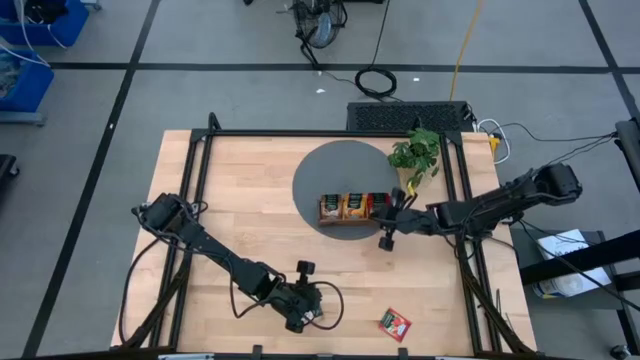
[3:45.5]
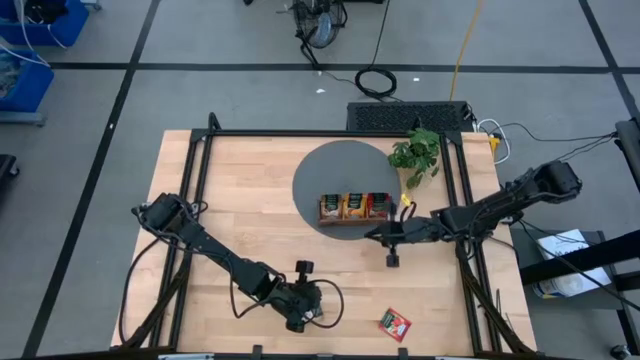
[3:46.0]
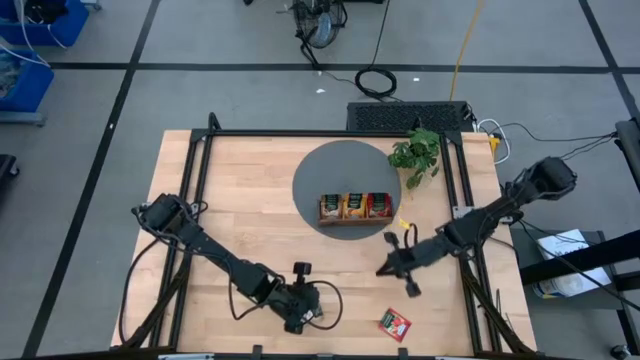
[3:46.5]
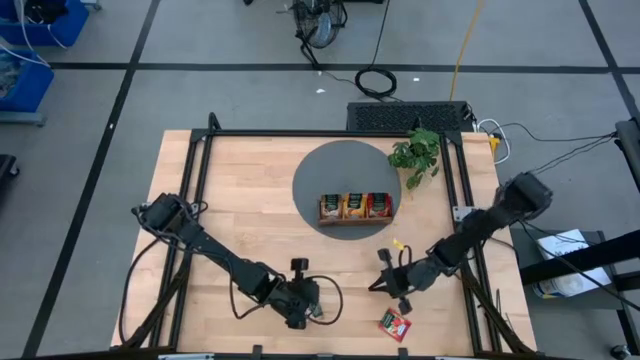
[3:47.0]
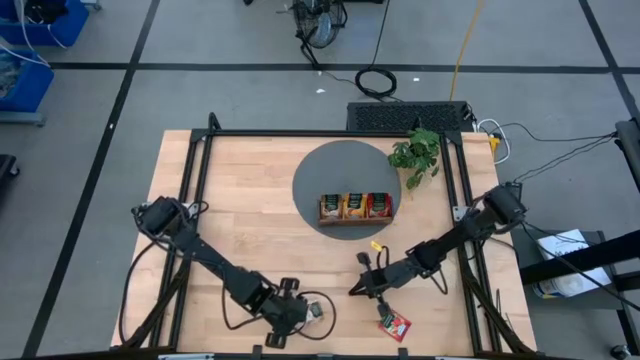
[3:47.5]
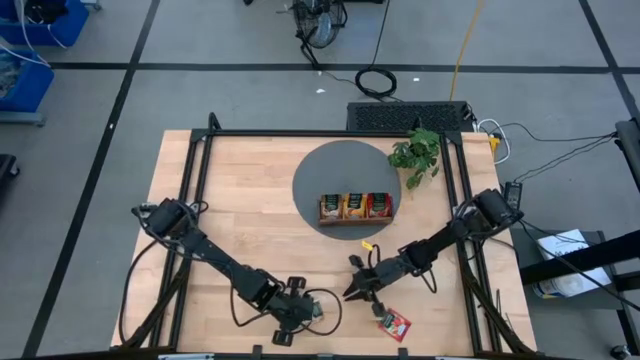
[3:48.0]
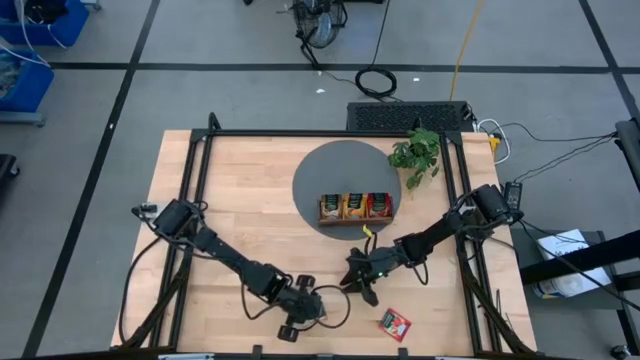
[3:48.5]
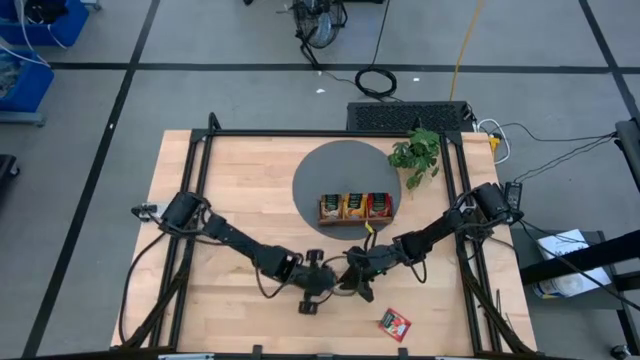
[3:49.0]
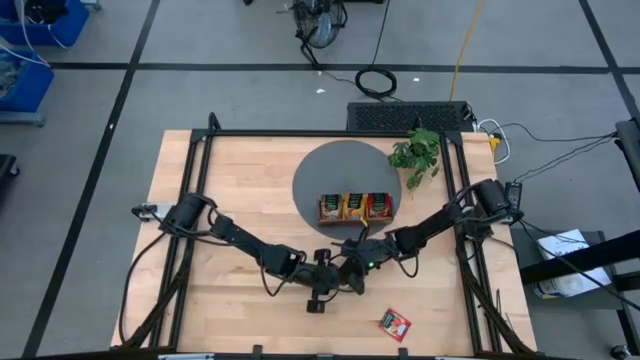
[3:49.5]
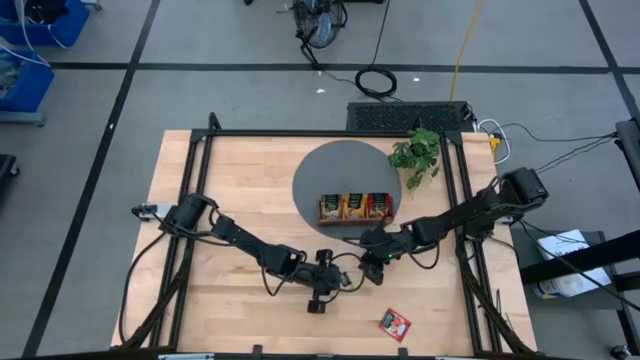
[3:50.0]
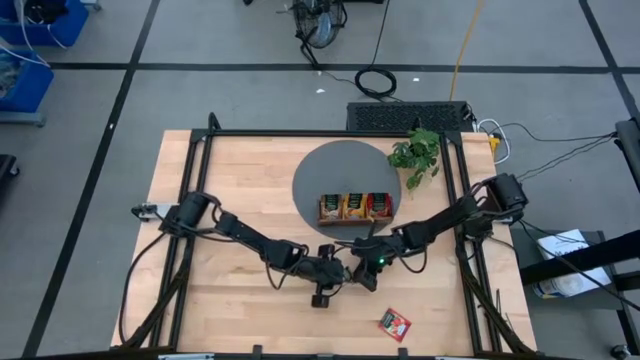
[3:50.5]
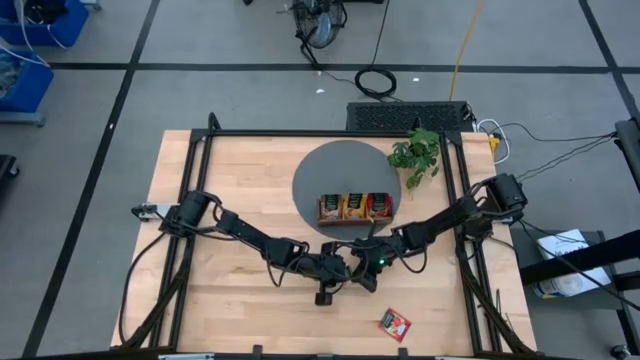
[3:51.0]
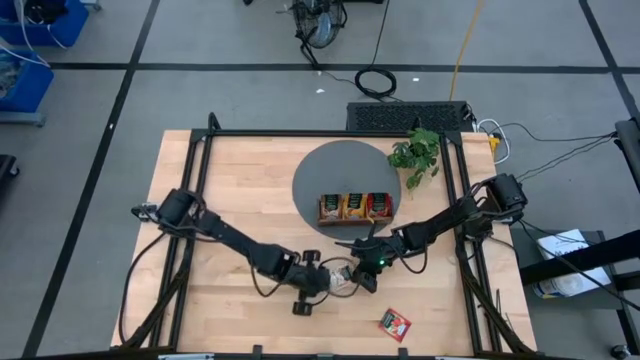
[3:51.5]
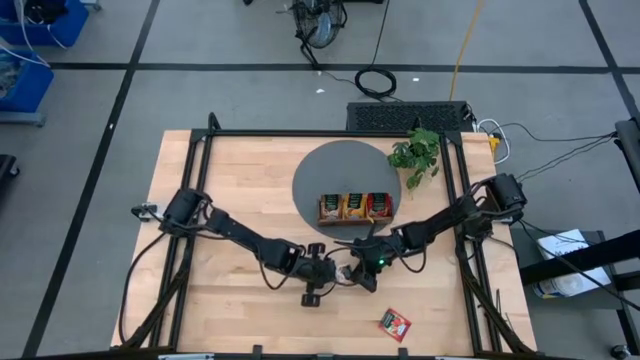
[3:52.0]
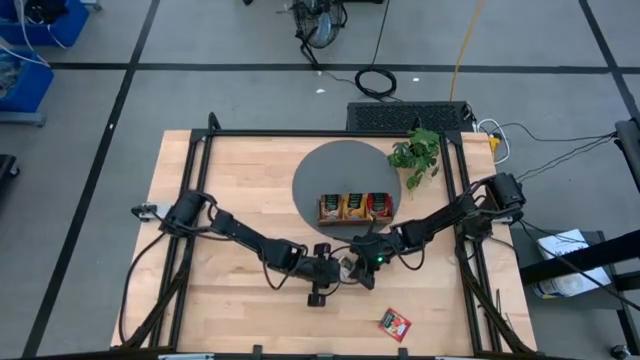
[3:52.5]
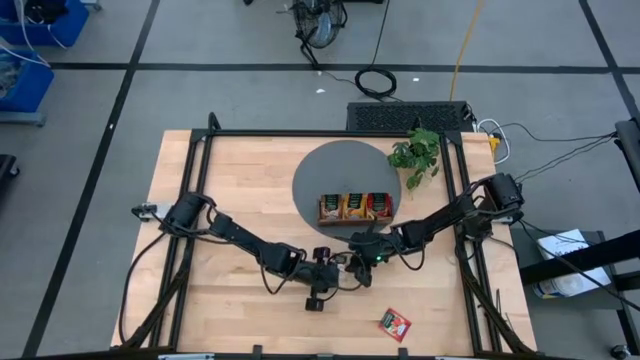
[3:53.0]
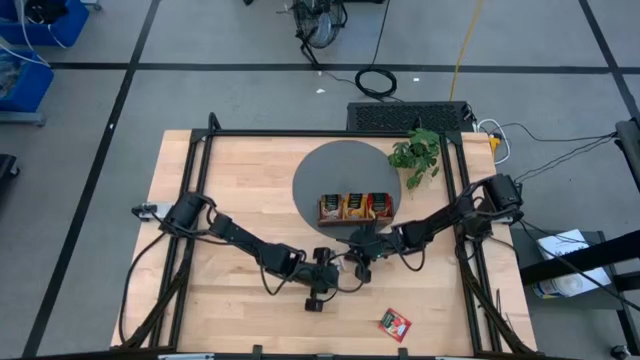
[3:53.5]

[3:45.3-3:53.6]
Task: Pick & Place Tea
Put the brown tea bag into the left section of the wooden organizer

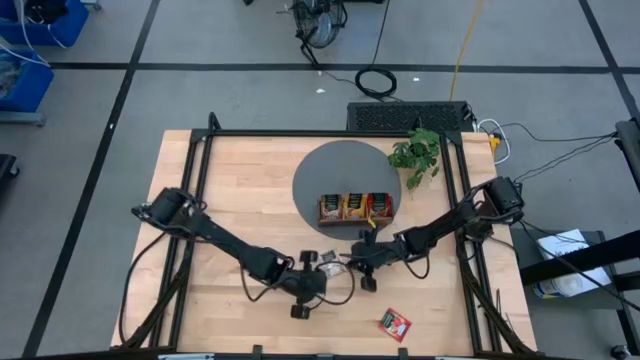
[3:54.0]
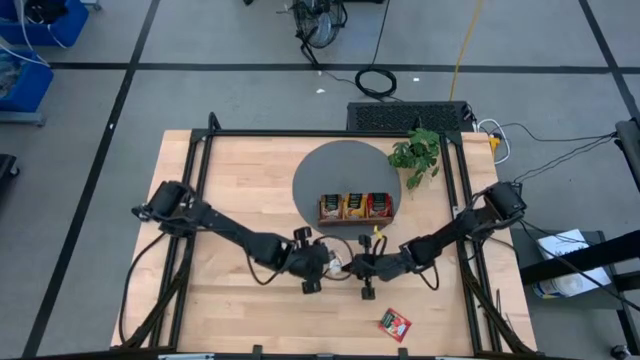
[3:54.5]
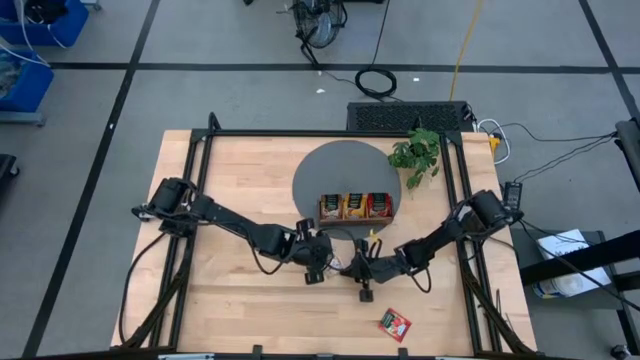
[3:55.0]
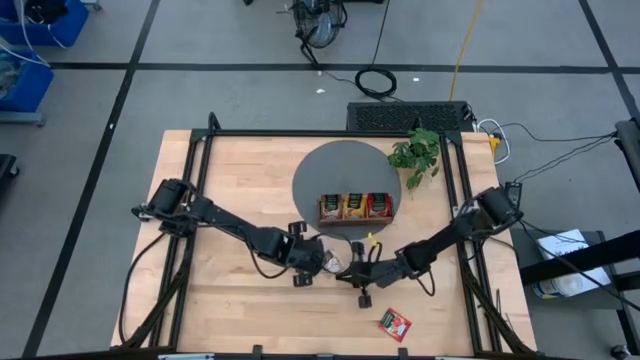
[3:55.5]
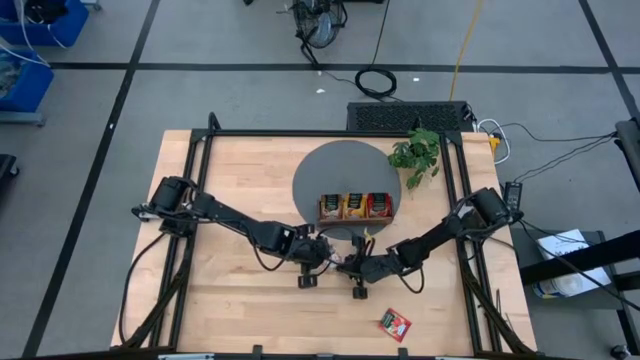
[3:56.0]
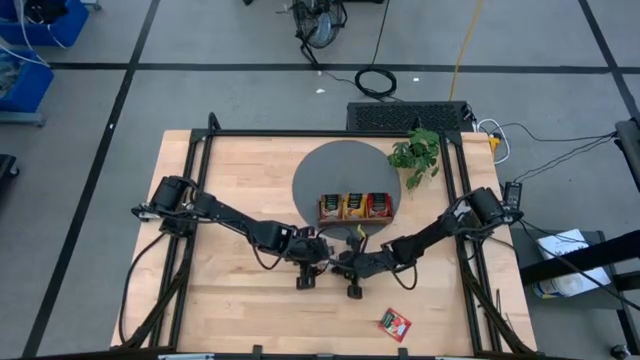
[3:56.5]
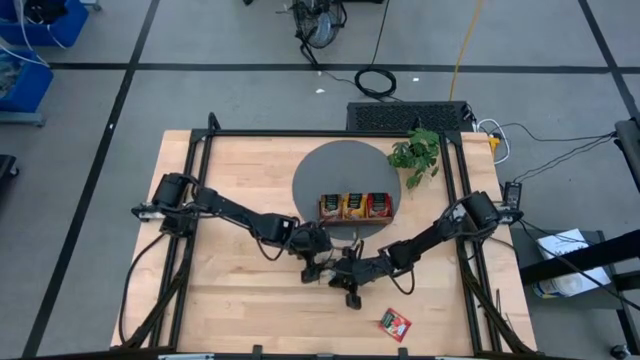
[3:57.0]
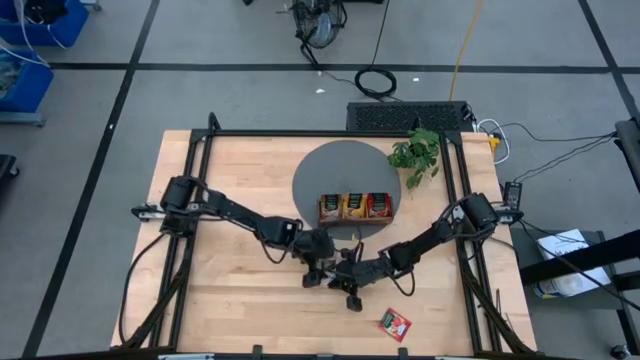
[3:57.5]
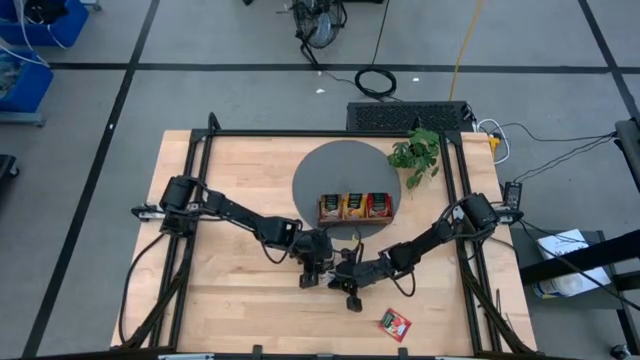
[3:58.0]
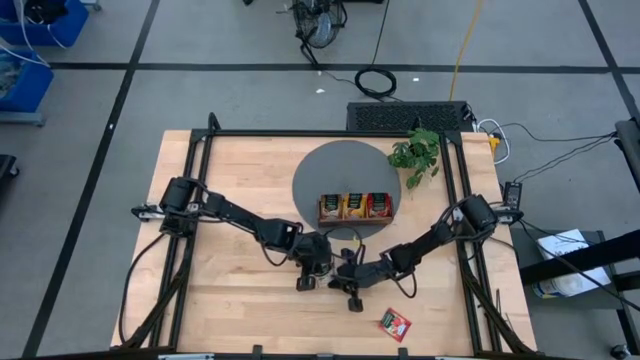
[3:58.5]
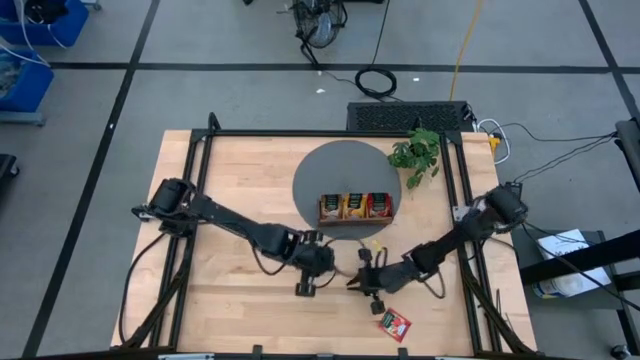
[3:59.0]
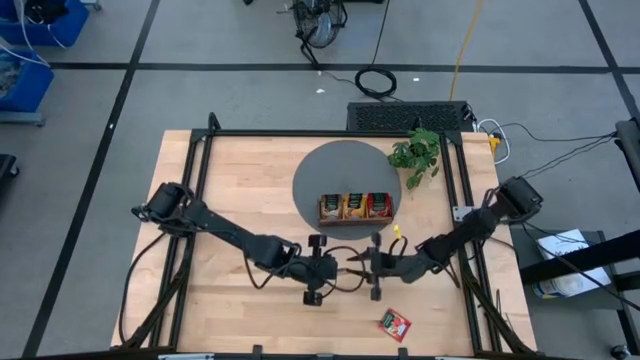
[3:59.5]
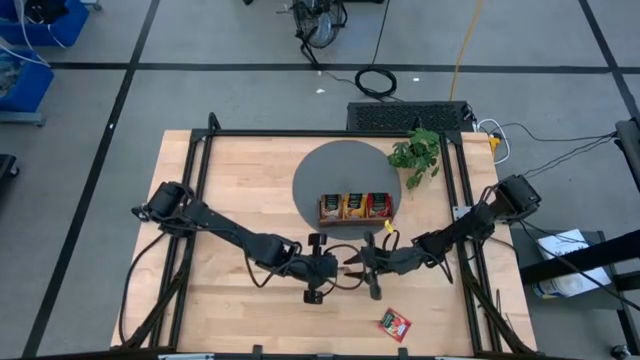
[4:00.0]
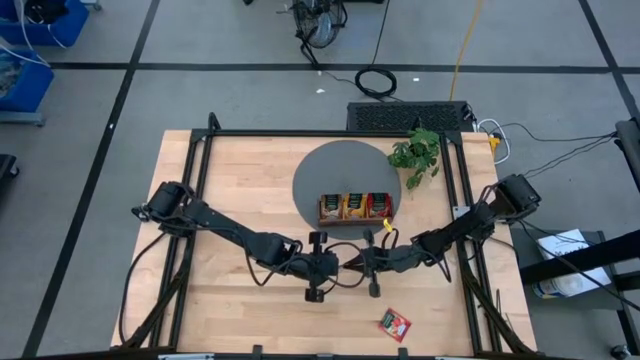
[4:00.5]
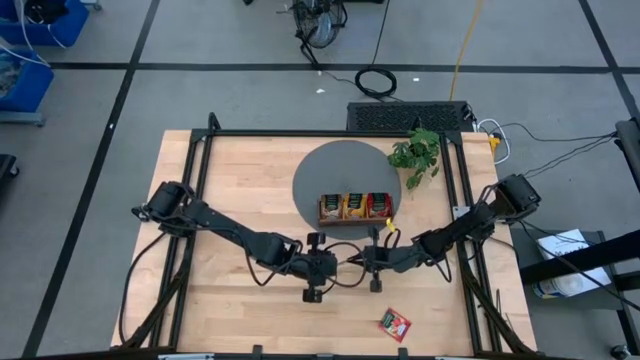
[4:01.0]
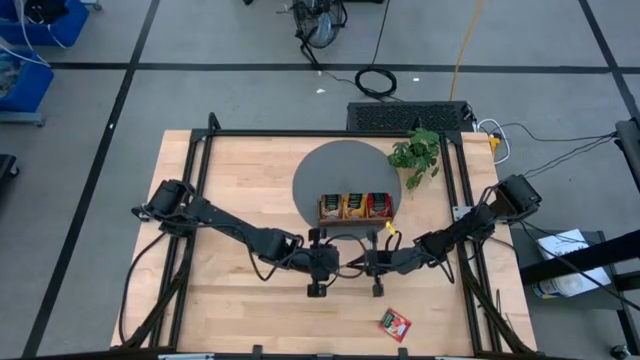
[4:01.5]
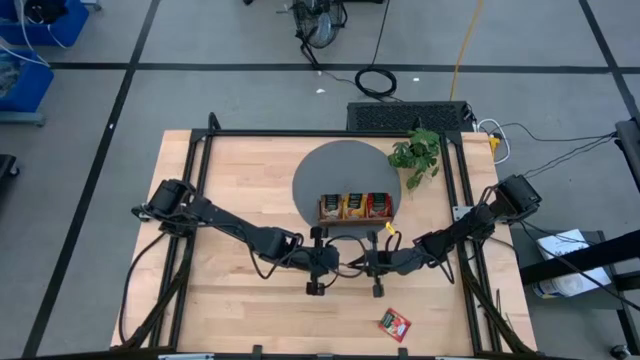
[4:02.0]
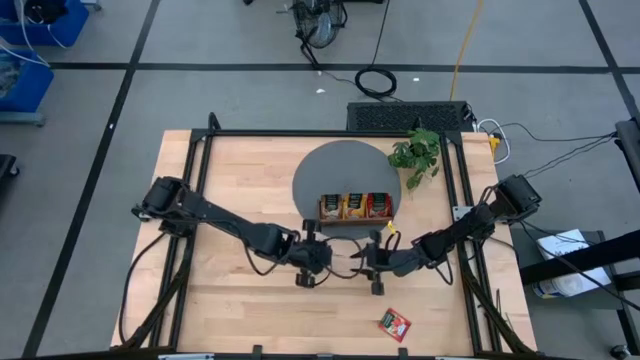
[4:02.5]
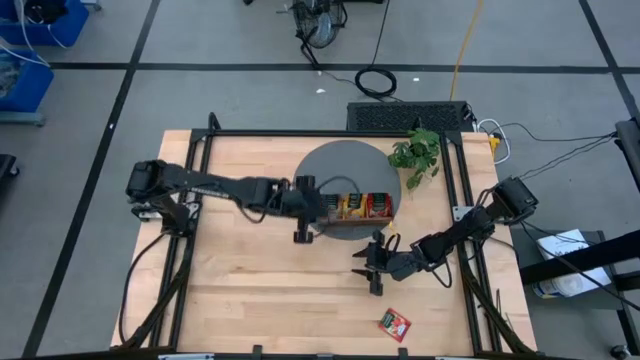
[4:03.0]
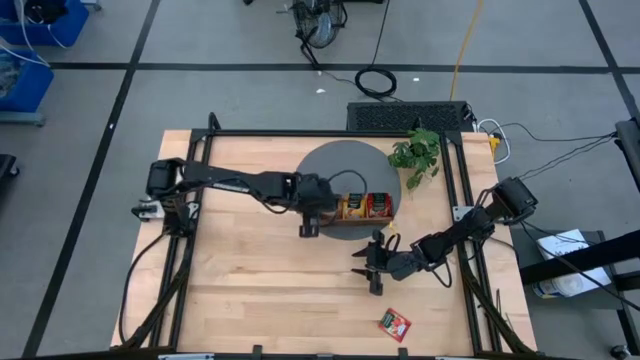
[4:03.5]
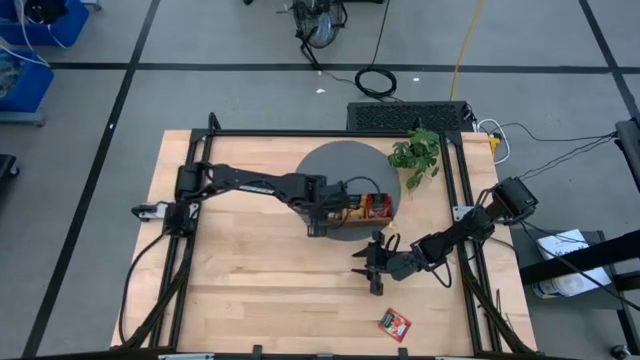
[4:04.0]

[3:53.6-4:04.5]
Put the brown tea bag into the left section of the wooden organizer
